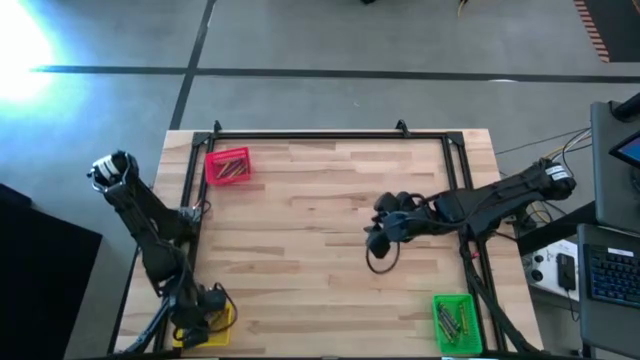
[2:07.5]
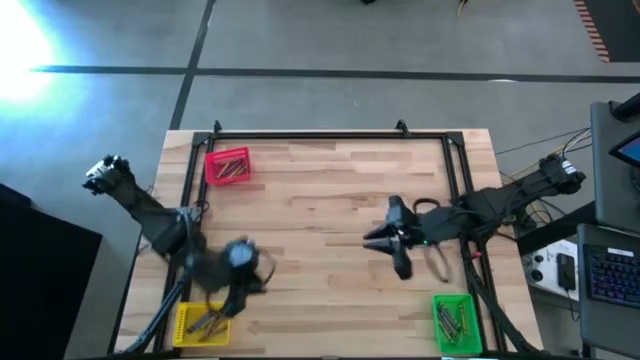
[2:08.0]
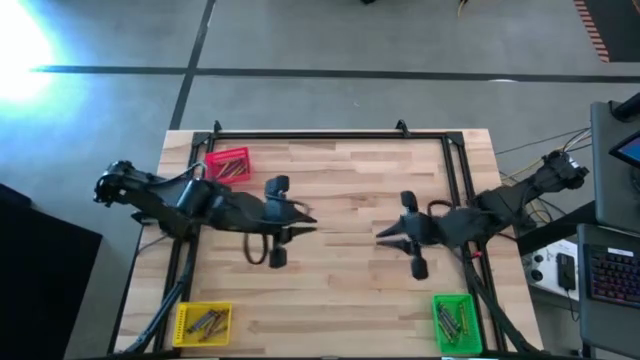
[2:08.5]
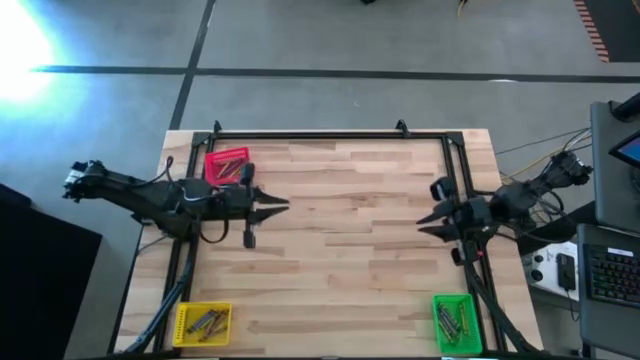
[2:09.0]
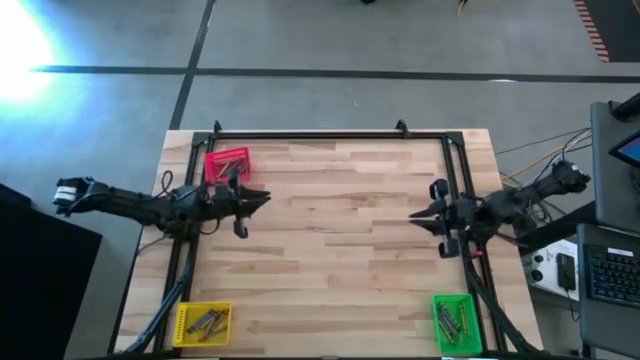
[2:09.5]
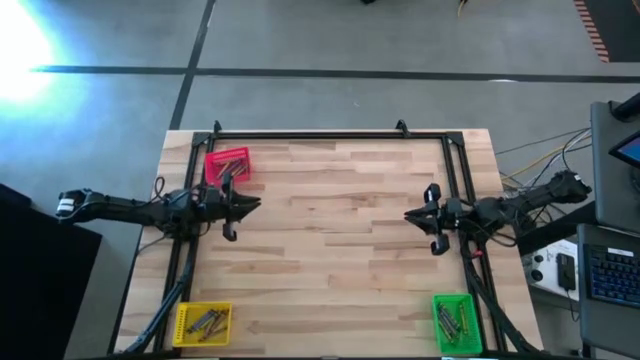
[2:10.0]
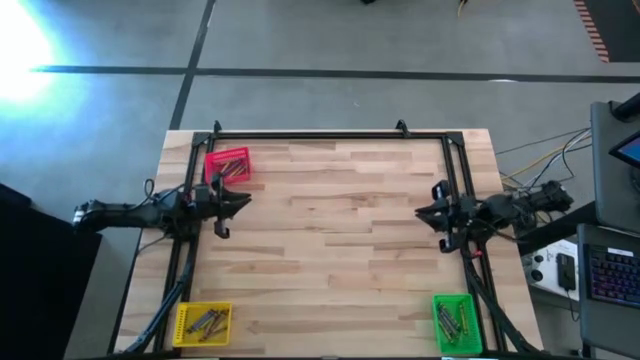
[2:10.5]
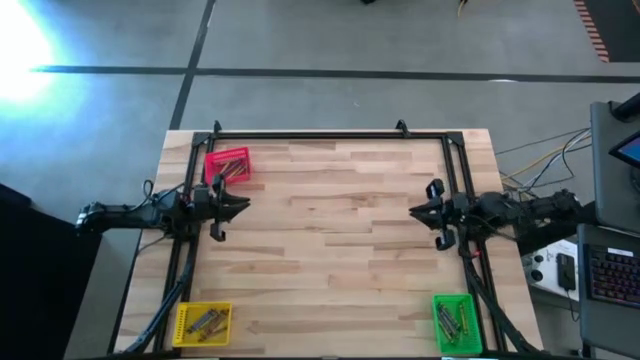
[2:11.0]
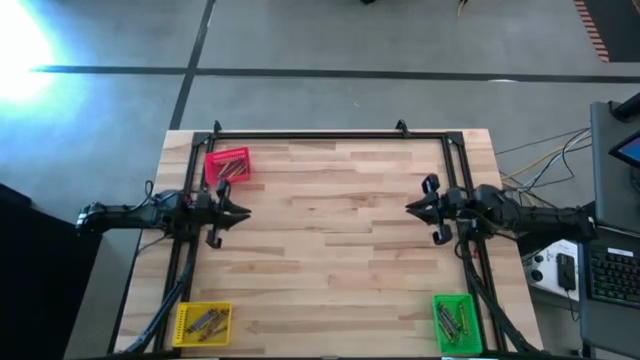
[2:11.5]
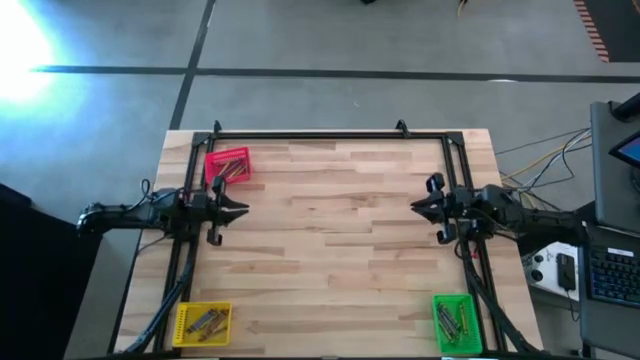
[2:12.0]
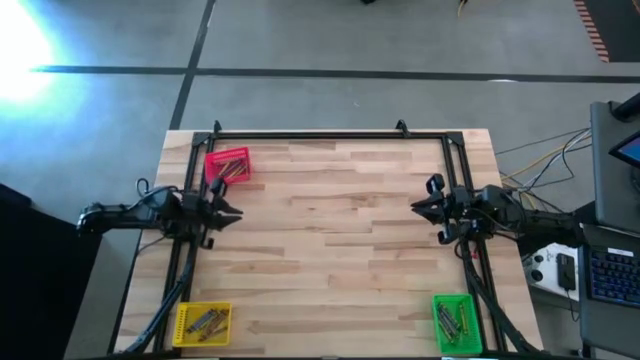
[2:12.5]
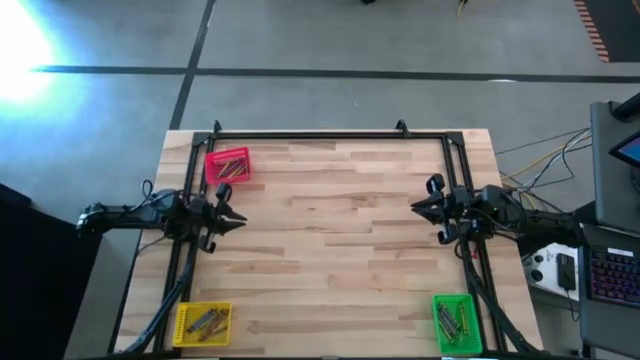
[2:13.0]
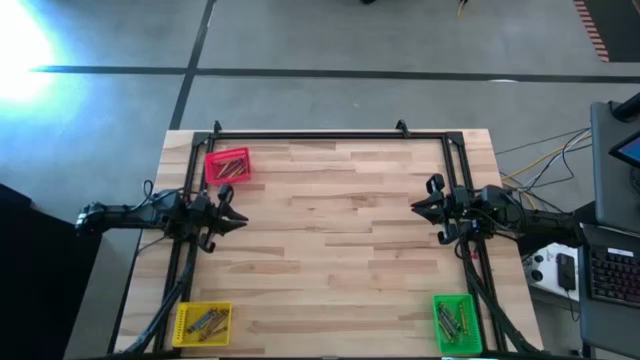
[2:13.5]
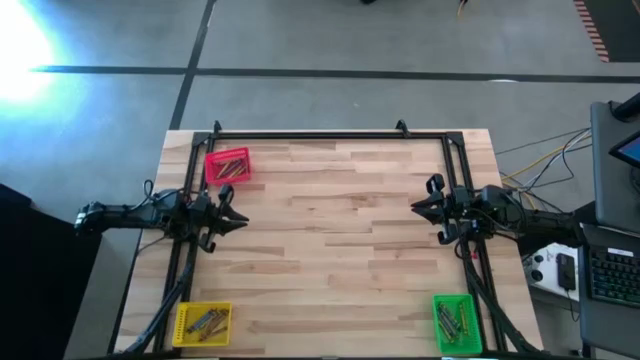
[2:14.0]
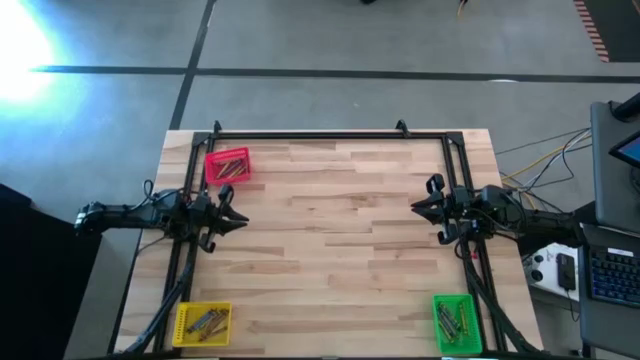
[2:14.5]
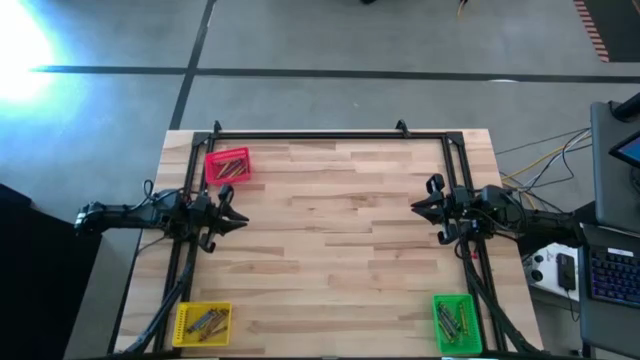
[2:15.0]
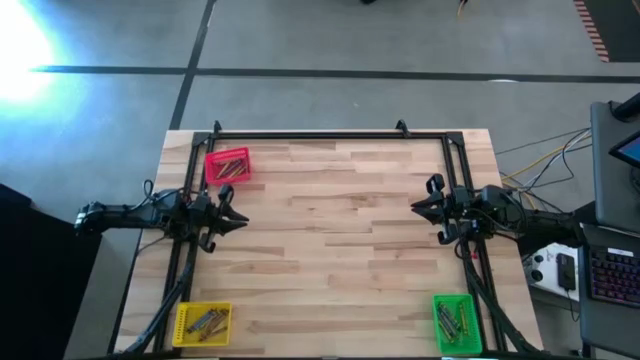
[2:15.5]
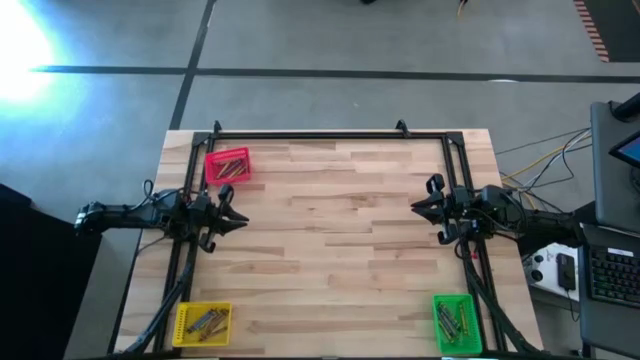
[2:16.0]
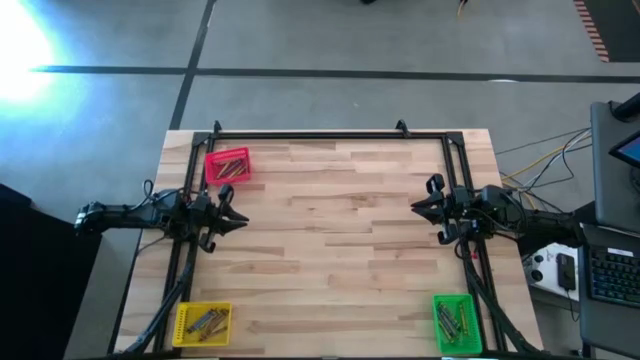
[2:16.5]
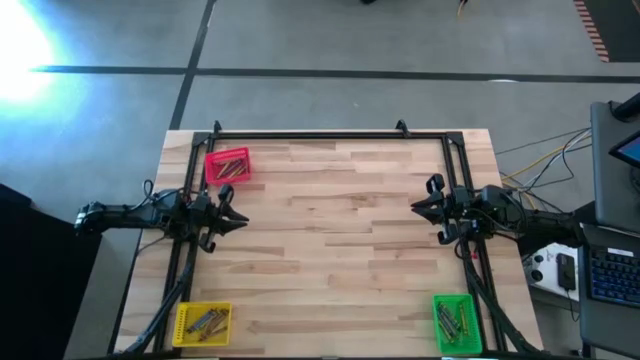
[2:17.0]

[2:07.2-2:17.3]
Task: Sort crayons
Return to Home Position

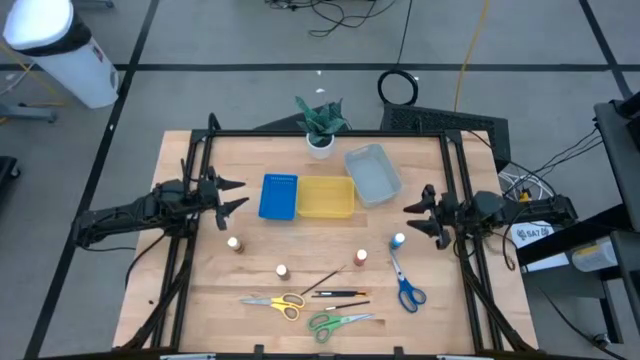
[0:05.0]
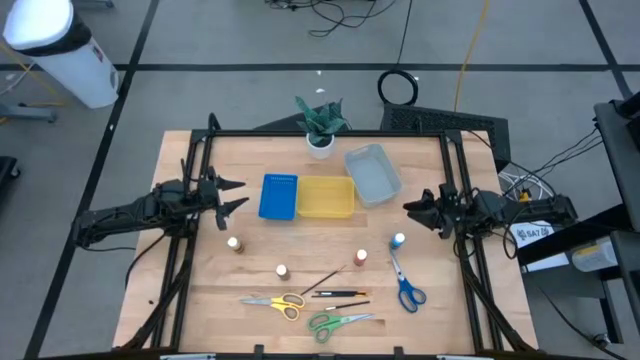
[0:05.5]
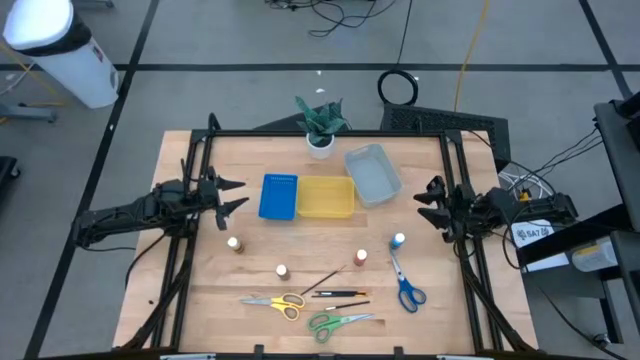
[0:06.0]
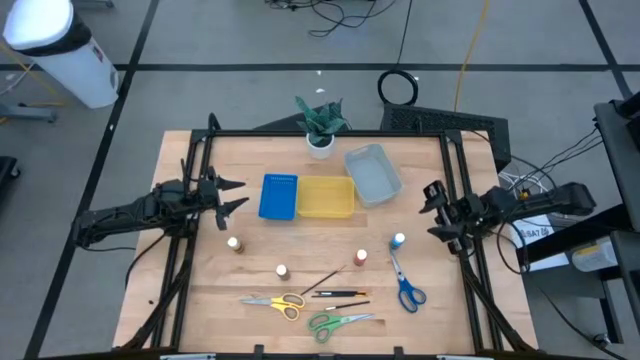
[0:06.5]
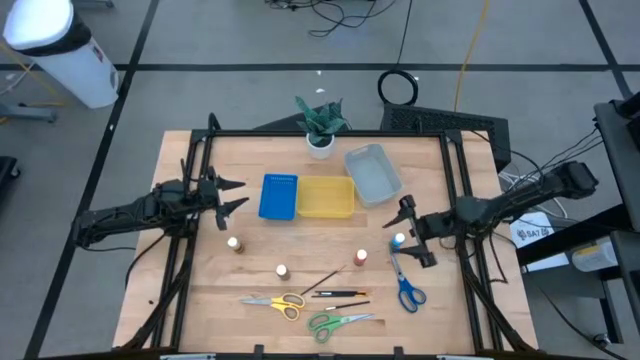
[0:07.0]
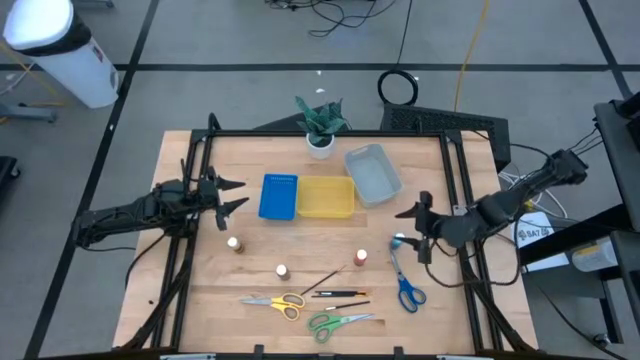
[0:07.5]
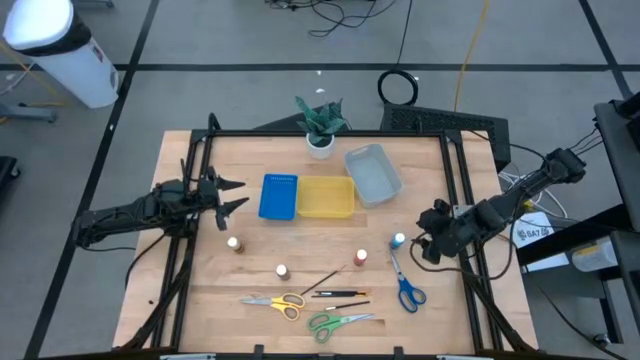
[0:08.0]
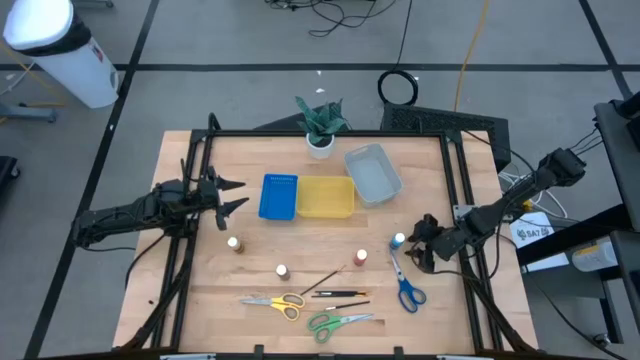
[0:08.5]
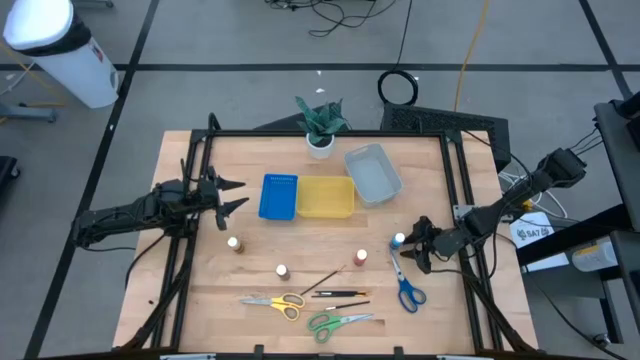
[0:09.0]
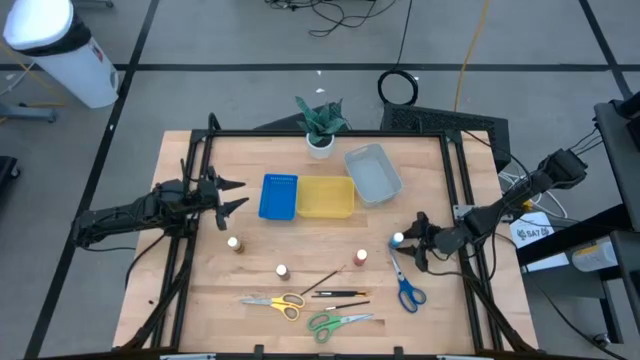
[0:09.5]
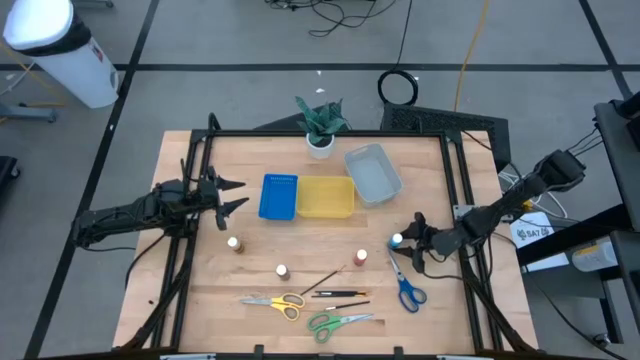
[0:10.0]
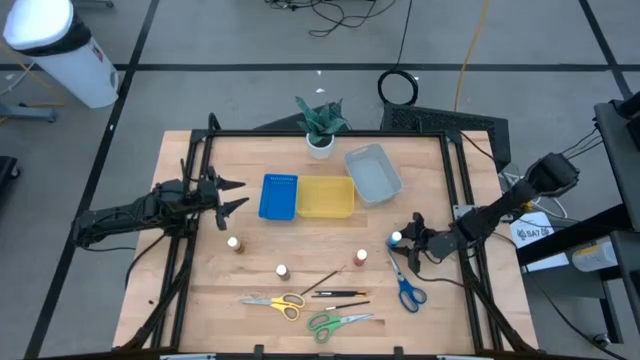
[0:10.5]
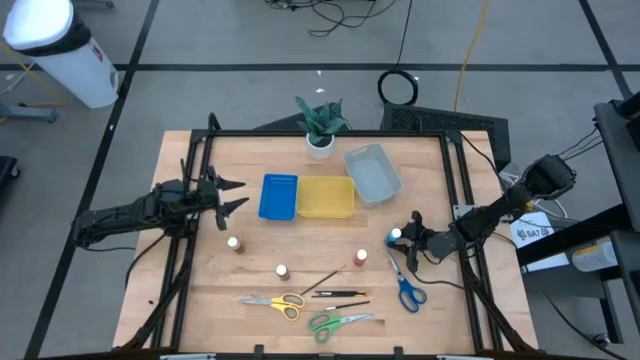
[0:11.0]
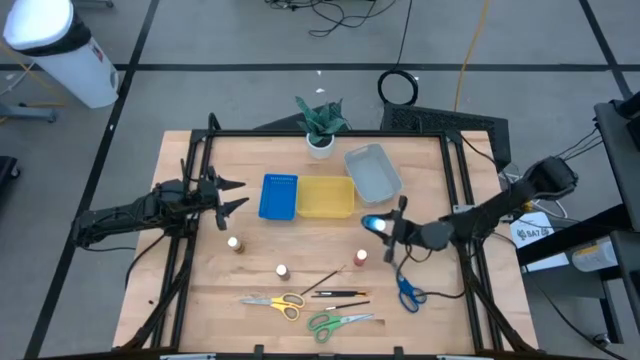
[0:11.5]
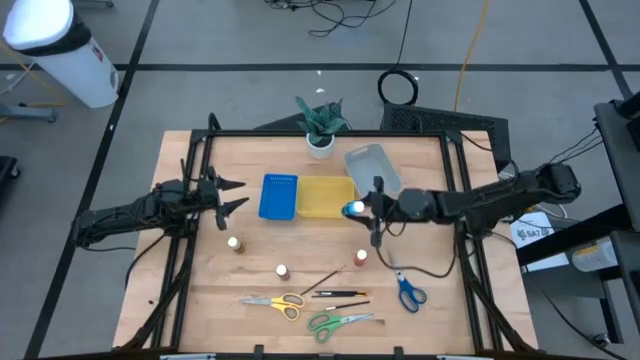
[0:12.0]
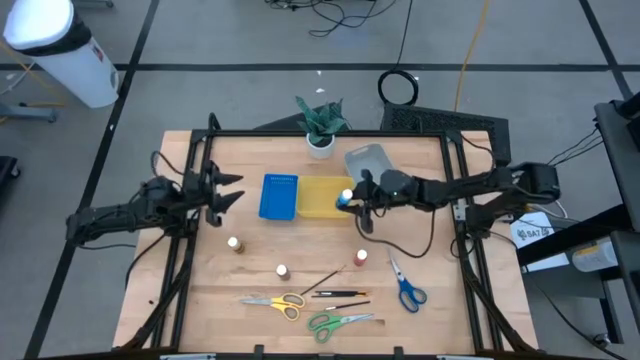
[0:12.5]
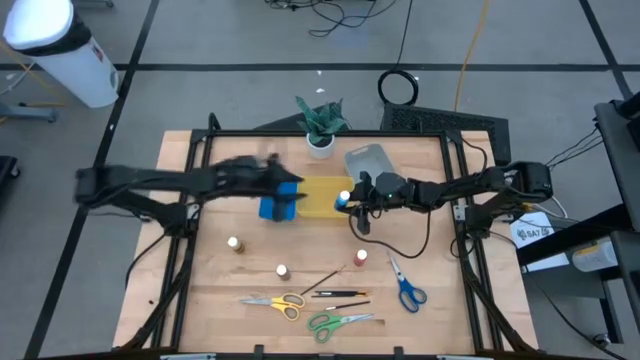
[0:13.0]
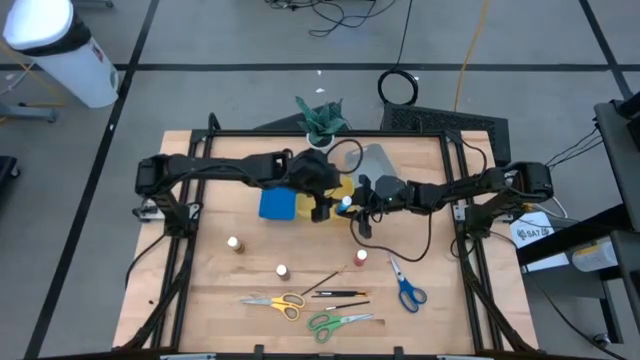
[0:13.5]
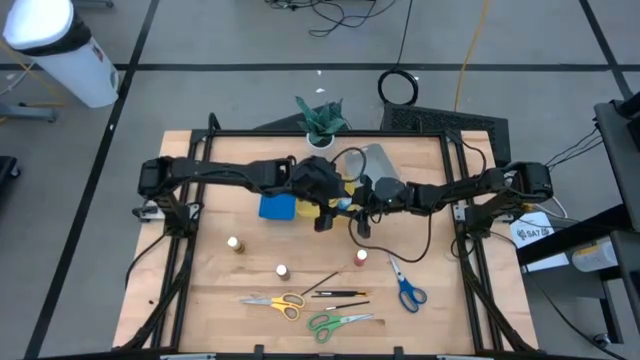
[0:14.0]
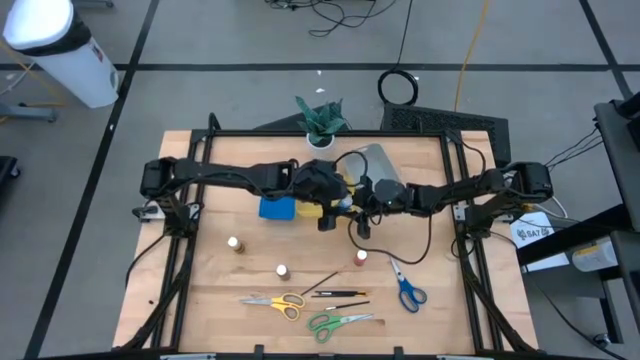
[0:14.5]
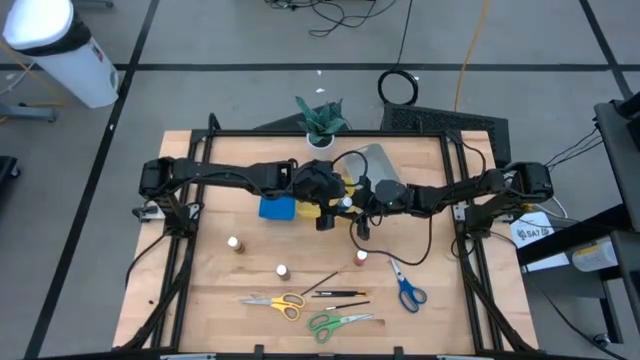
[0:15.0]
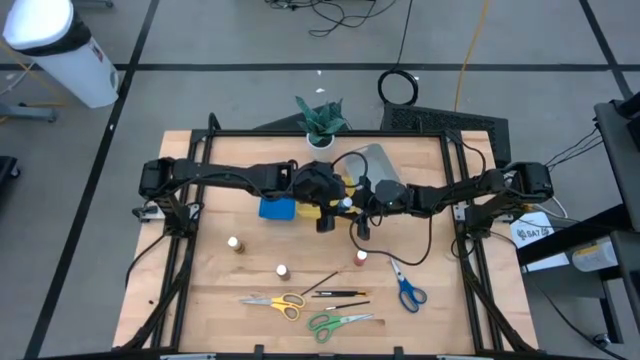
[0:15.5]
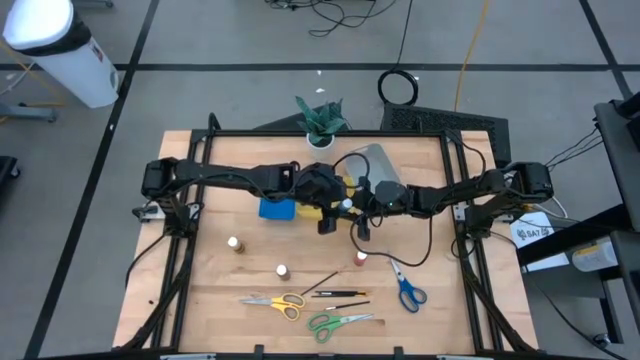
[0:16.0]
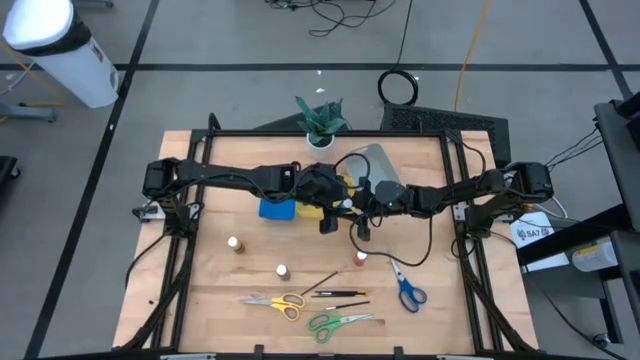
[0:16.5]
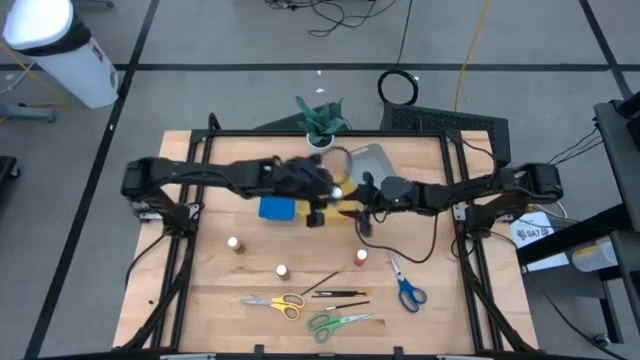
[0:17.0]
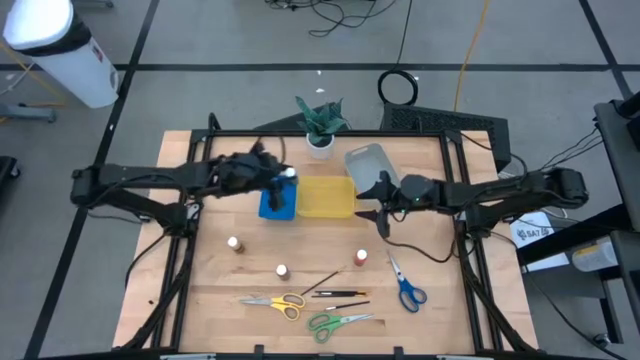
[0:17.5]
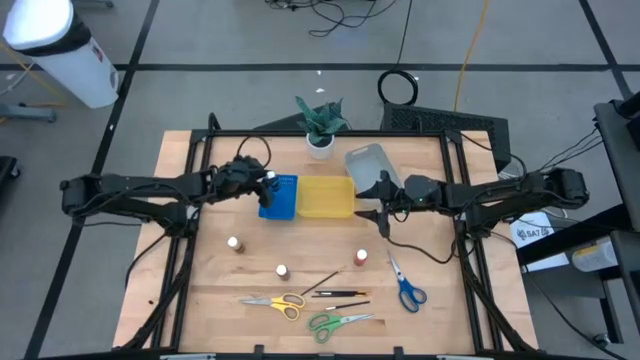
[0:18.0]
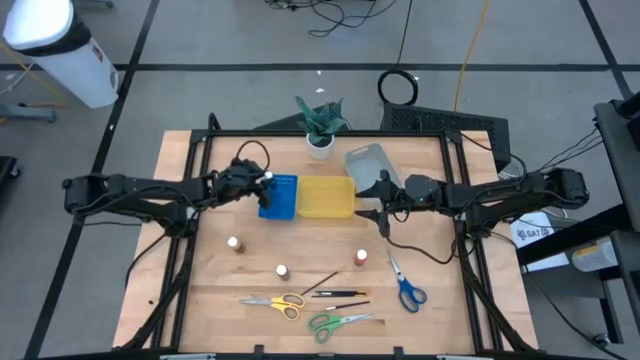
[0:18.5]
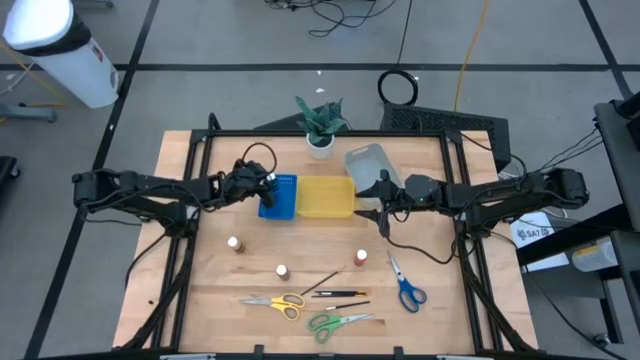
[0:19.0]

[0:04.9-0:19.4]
Task: Pick & Place Paint Supplies
Put the blue paint bottle into the blue bin
